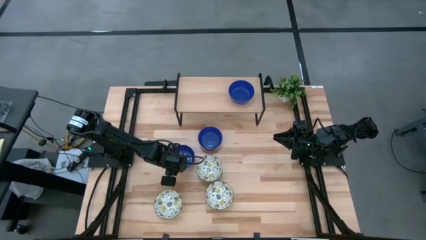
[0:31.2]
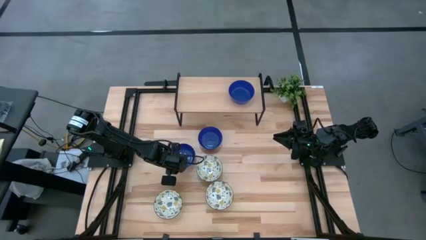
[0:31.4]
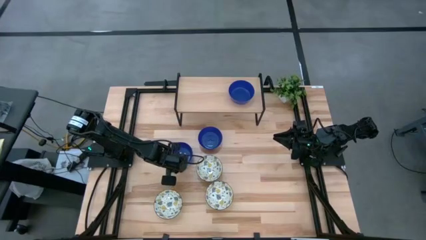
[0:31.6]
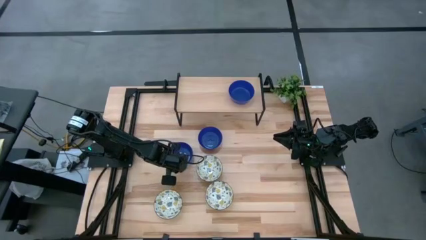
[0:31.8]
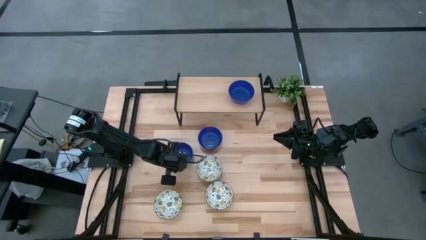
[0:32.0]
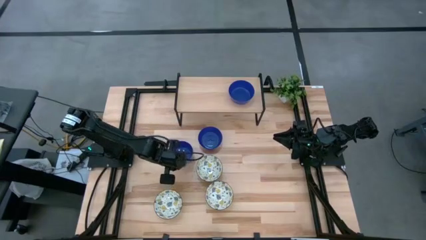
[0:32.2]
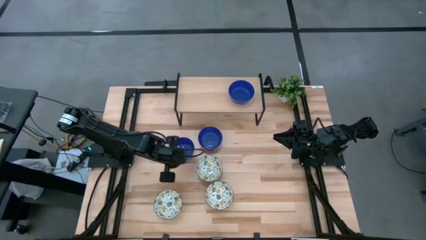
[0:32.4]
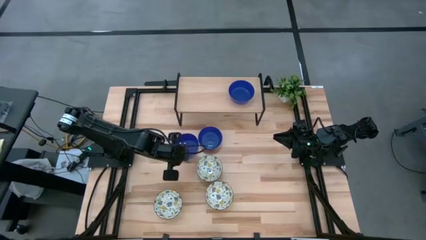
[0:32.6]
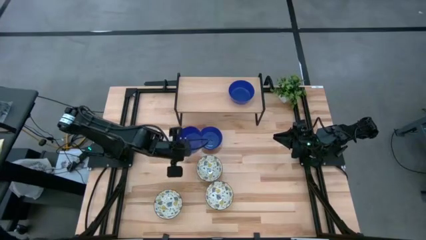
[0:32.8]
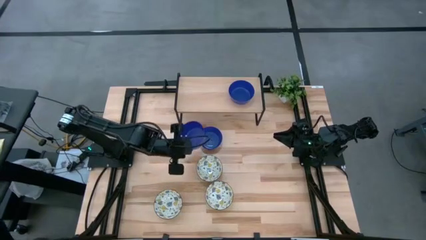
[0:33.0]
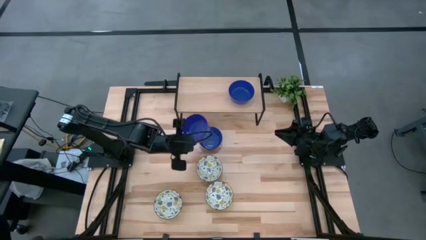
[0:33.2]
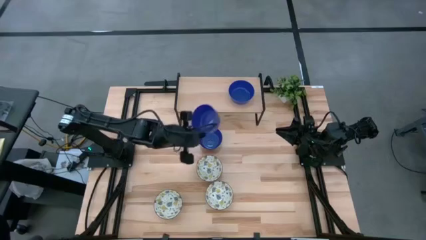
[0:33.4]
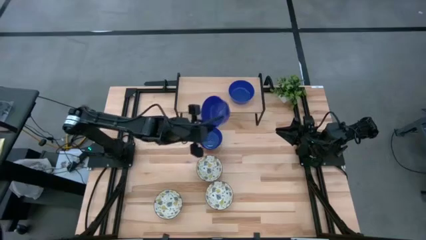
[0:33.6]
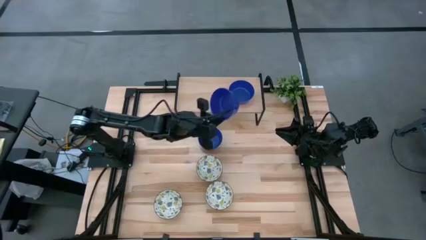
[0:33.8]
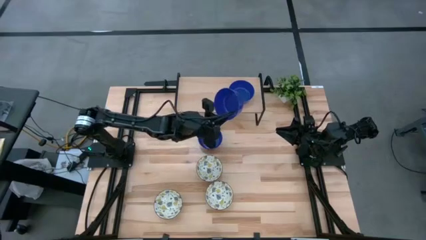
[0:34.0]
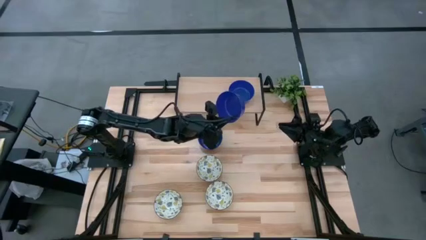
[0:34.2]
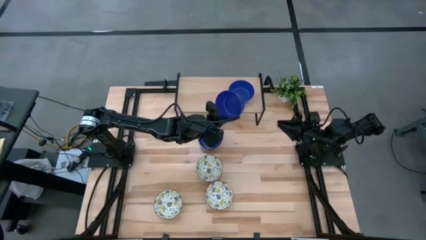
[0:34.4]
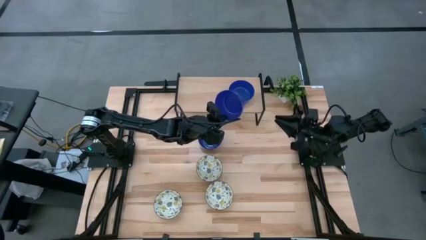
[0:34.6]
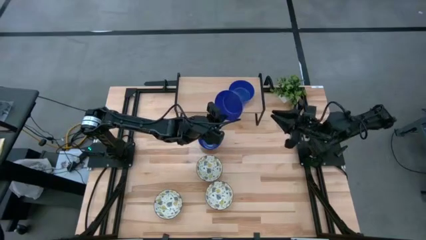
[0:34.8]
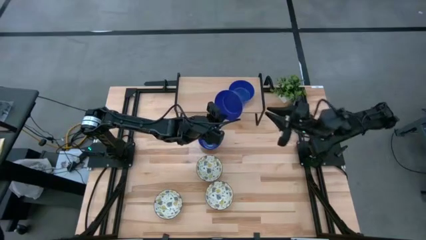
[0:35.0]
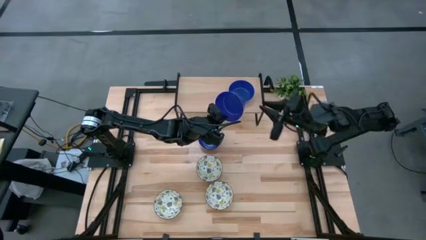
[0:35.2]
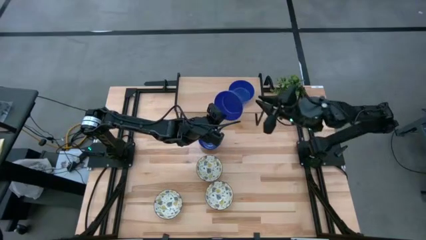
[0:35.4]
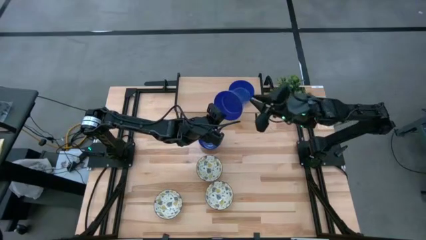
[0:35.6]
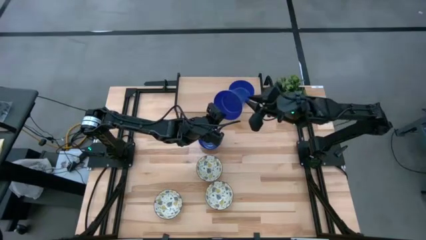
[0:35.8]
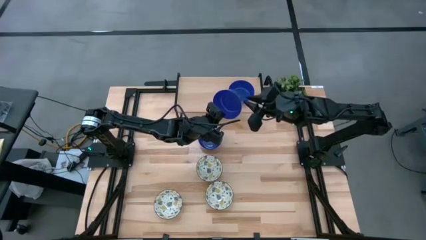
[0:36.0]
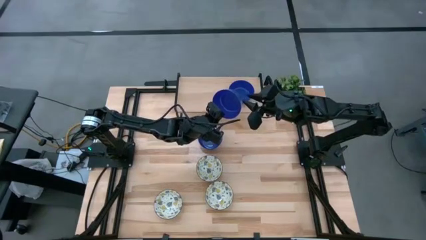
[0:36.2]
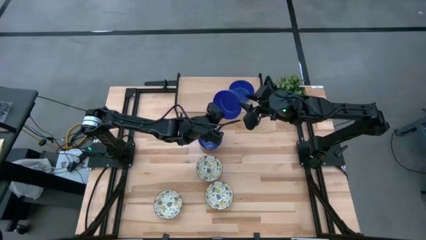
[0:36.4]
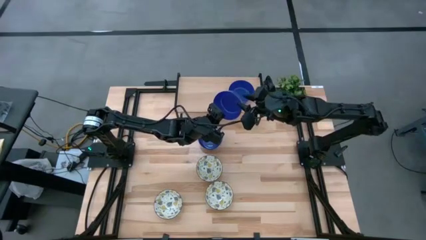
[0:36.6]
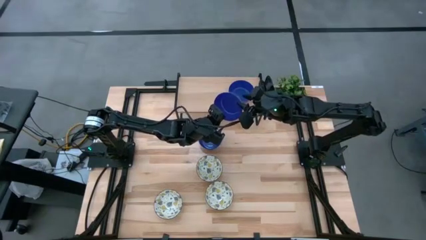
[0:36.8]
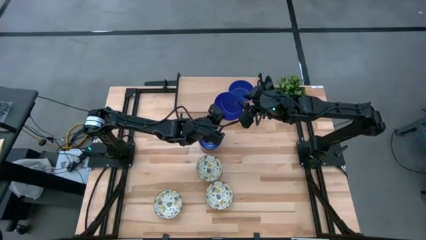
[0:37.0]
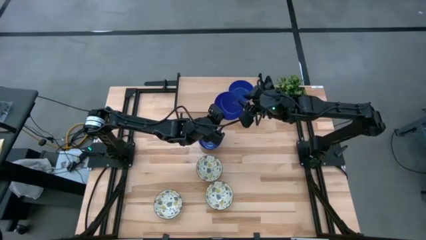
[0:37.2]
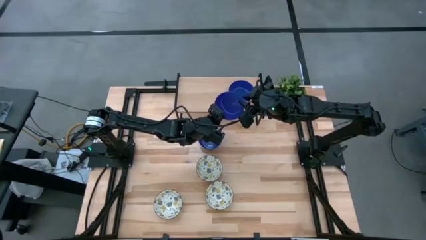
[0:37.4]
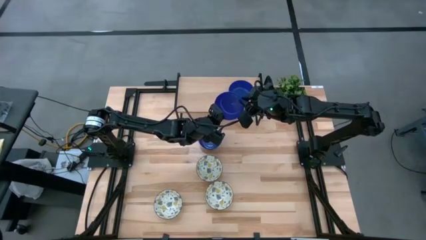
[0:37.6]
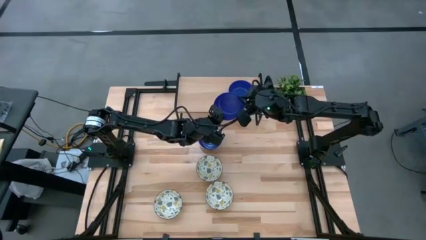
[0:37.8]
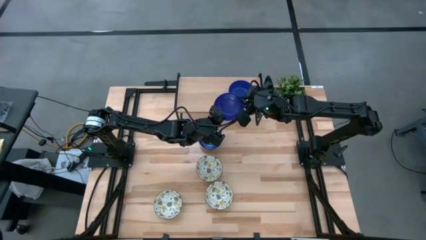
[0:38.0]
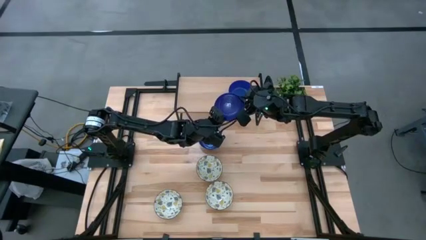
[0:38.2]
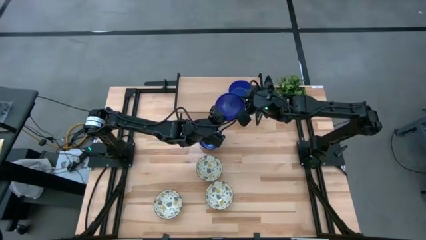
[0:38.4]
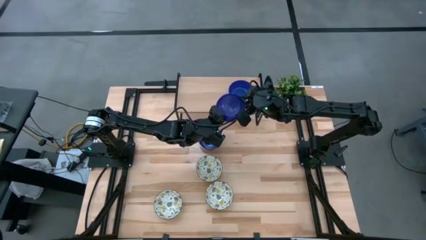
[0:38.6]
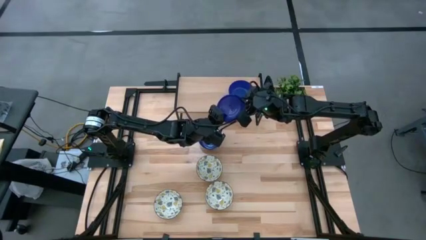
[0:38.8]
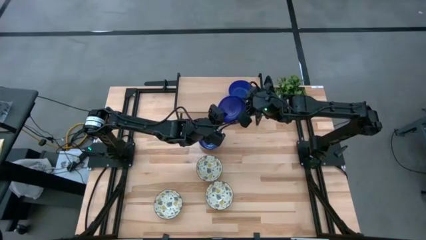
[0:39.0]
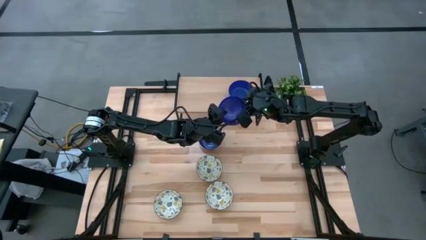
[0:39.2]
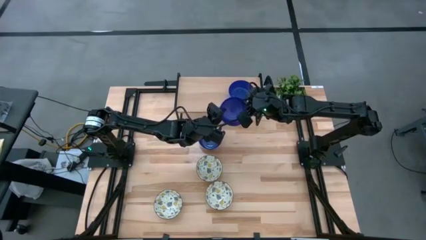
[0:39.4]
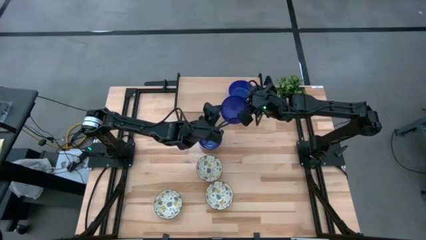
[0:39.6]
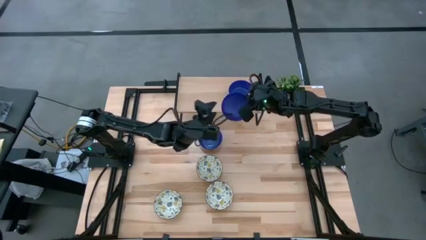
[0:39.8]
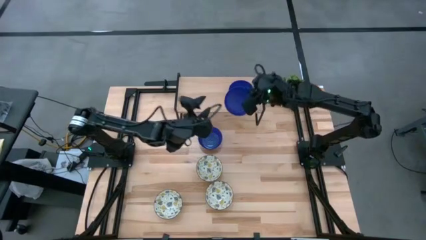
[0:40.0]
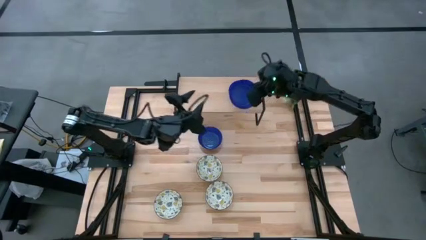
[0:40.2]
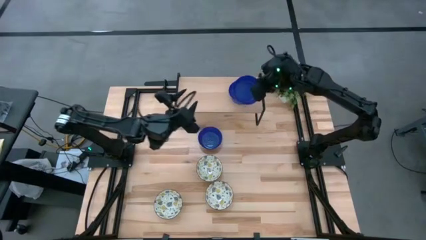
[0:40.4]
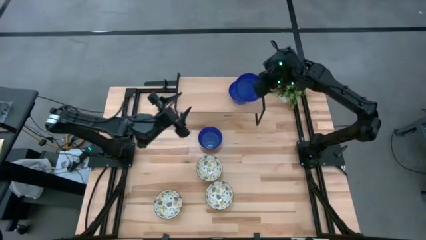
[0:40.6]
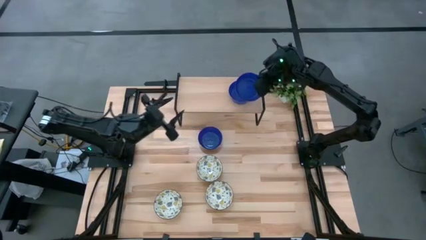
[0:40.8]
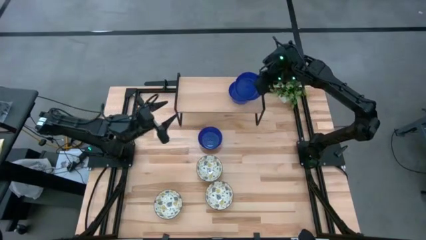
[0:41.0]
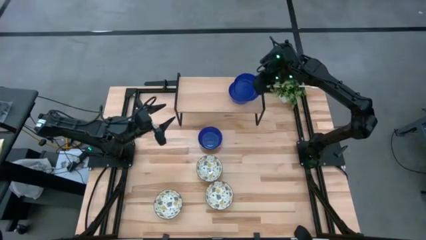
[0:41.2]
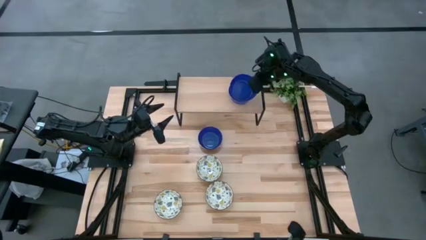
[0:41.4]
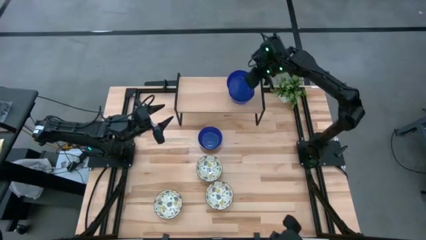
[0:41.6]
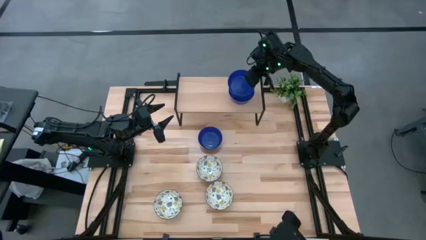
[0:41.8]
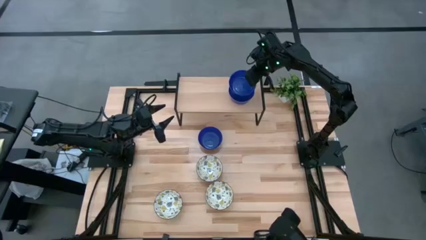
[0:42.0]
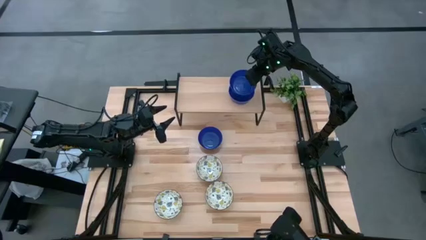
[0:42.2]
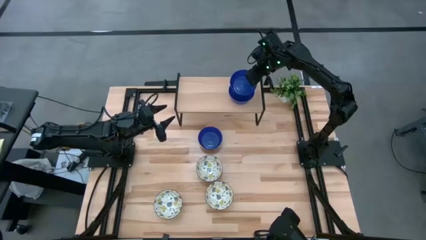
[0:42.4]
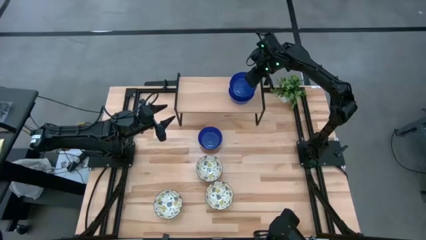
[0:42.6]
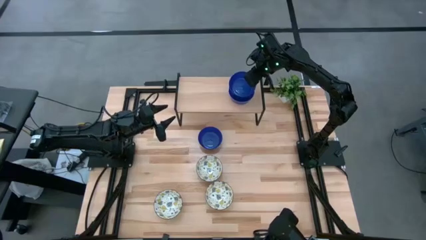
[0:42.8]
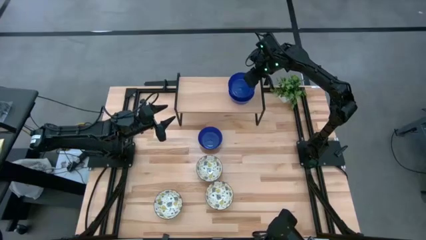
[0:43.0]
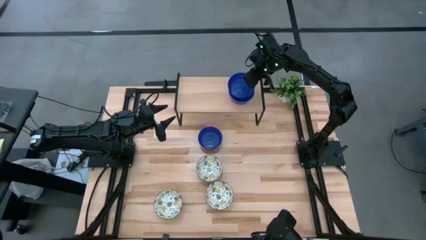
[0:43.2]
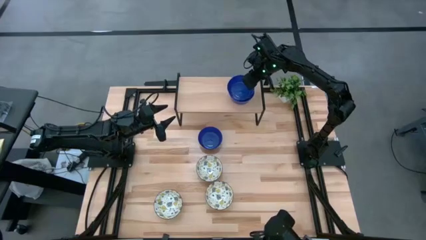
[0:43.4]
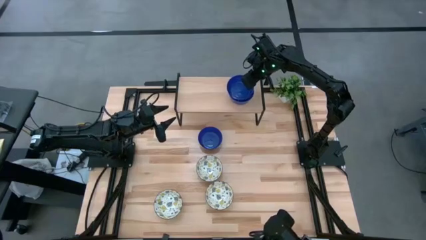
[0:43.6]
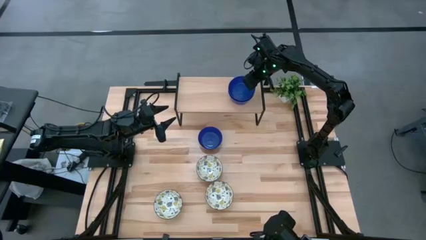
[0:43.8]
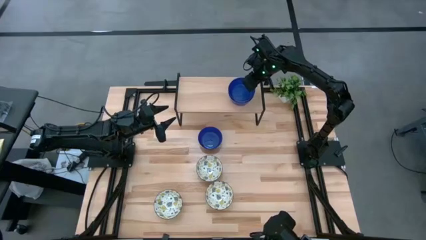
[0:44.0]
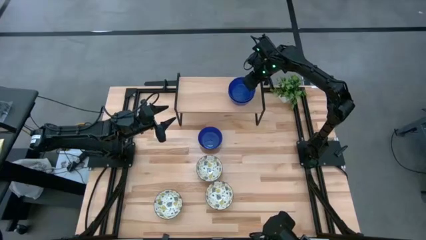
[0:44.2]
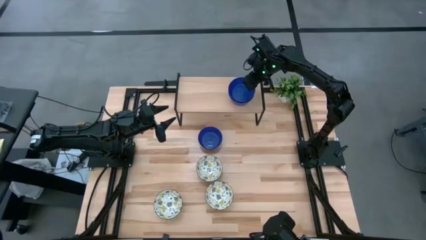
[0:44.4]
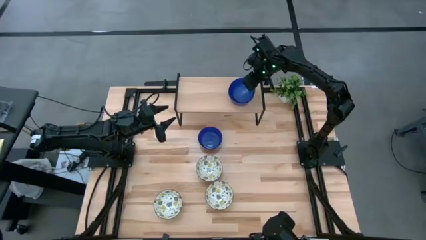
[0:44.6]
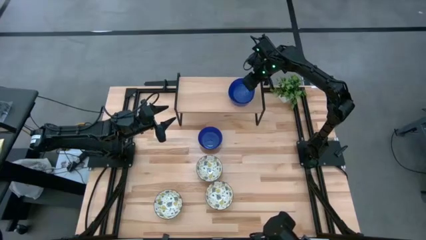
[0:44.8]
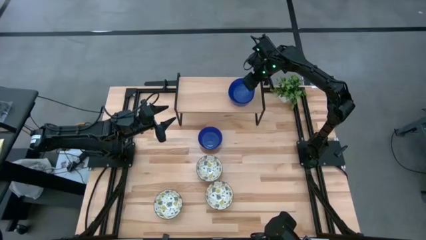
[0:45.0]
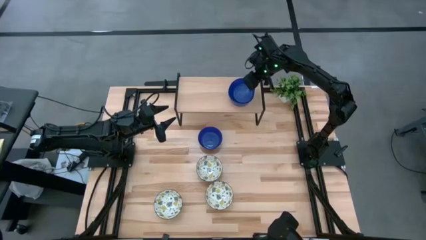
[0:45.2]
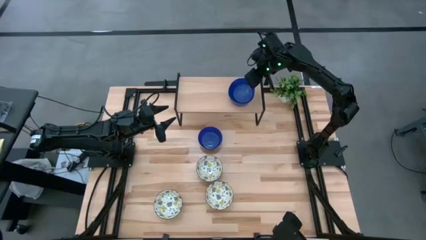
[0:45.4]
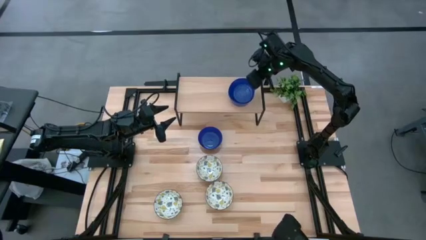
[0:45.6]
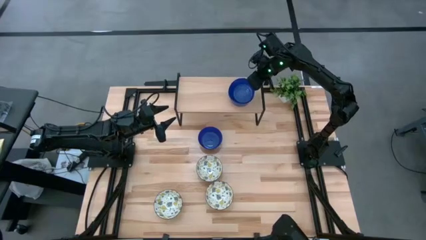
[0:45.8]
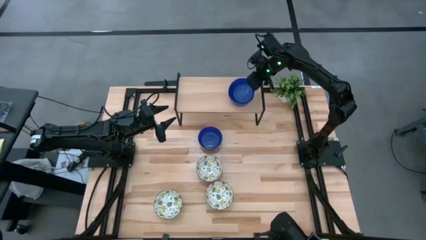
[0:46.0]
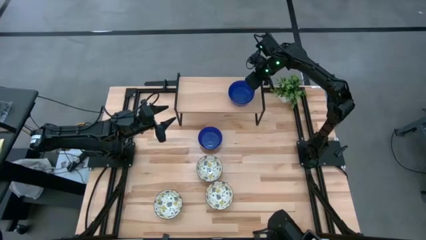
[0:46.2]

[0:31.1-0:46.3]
Task: Pick & Place Mini bowls
Stack the left blue bowl on the blue bowl on the shelf
